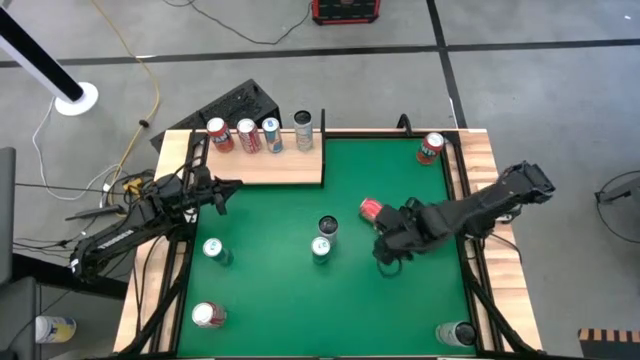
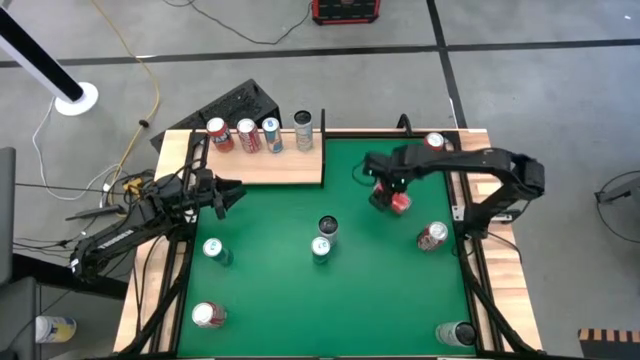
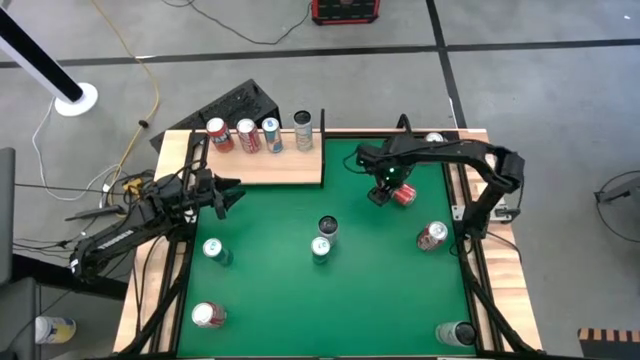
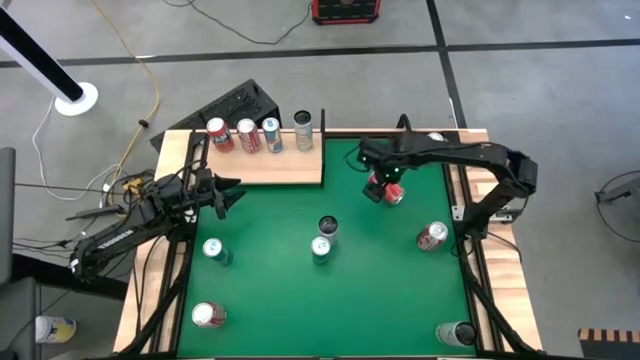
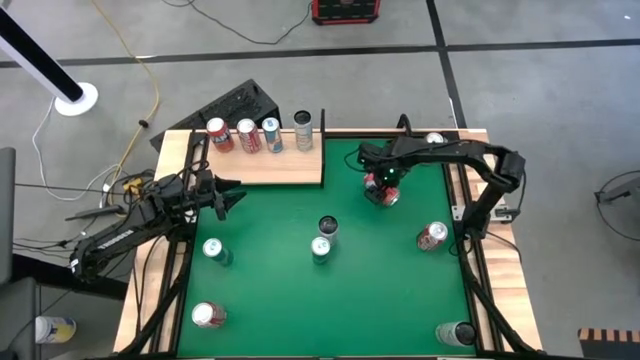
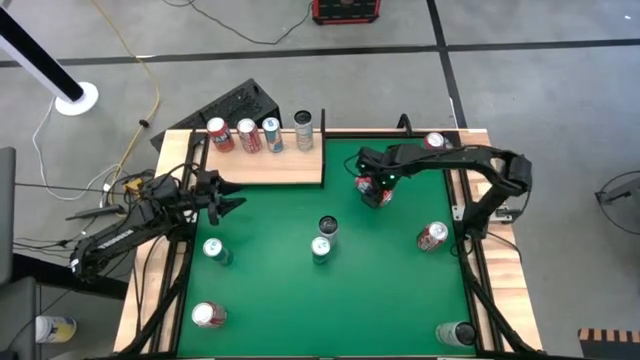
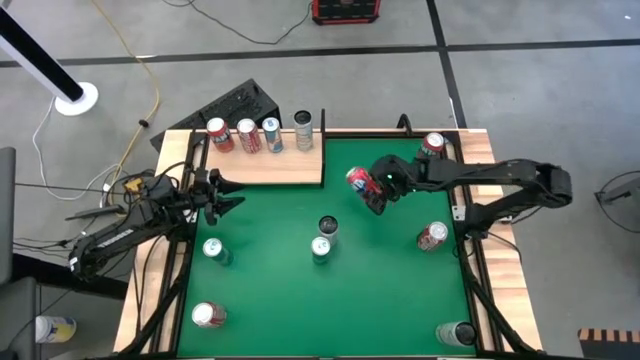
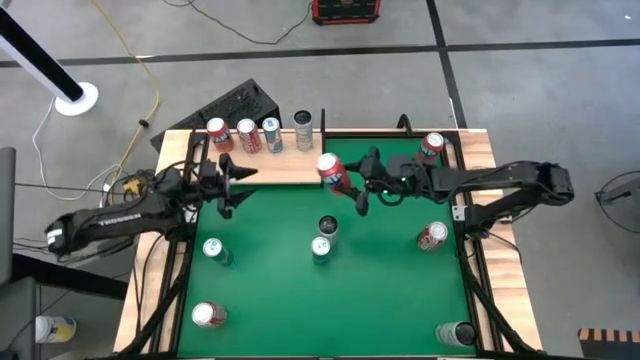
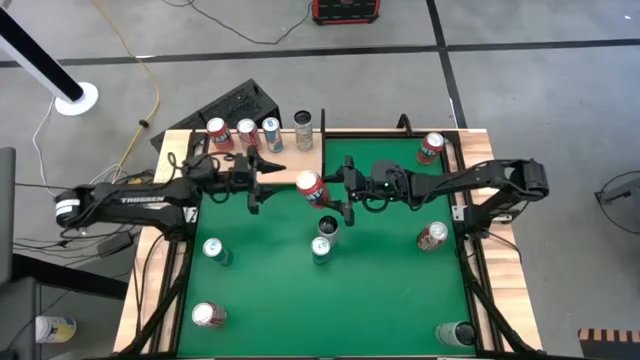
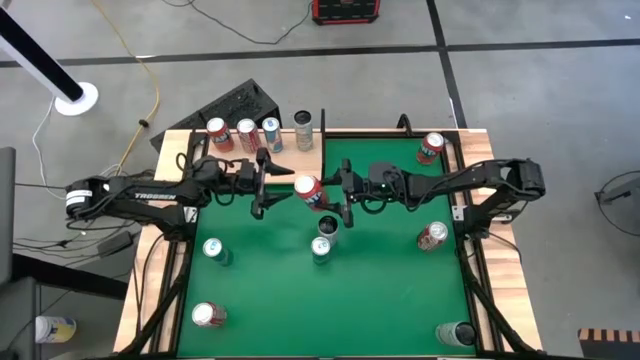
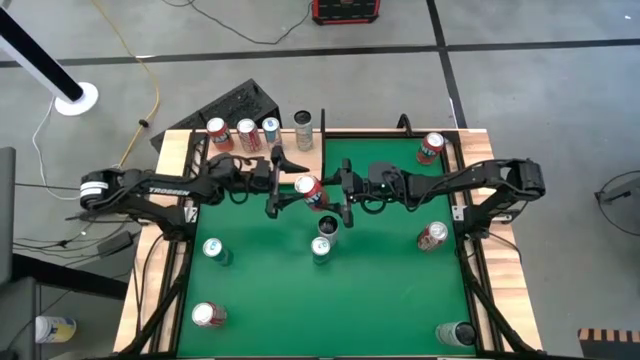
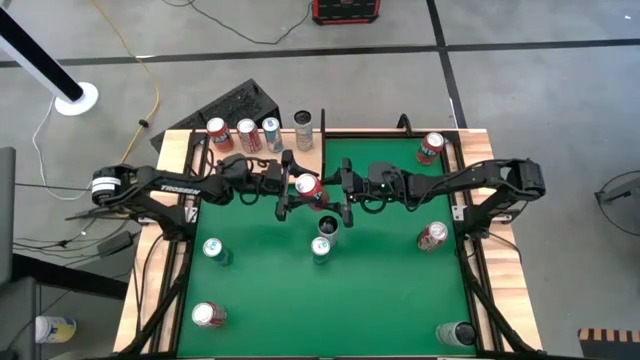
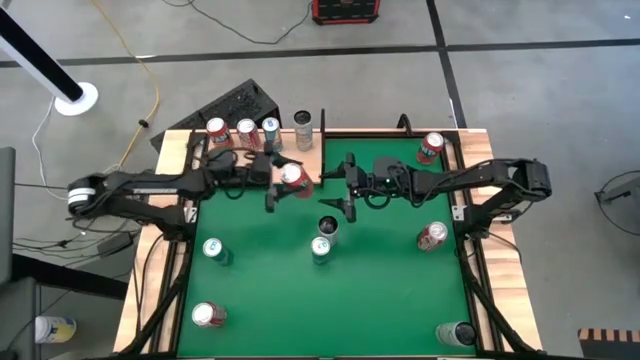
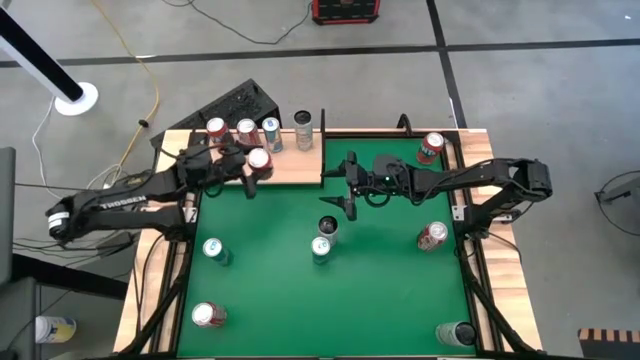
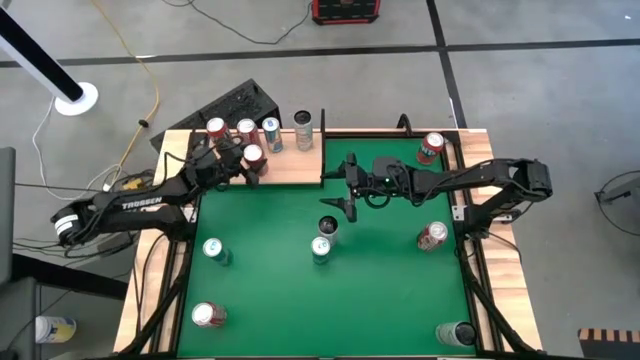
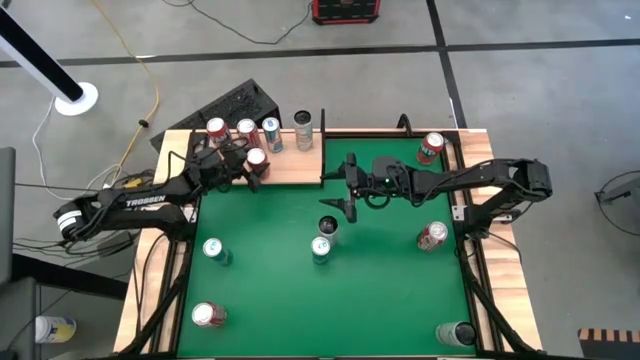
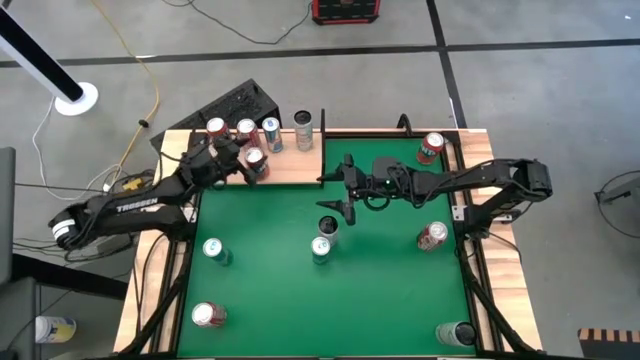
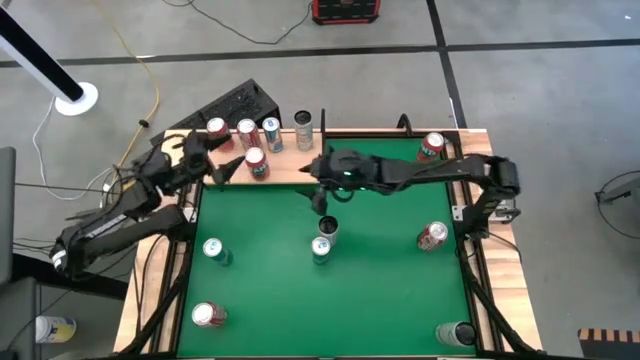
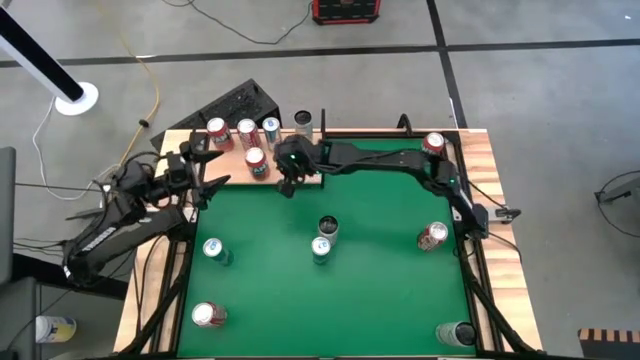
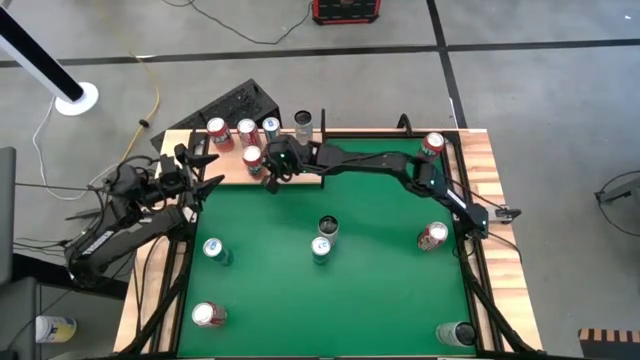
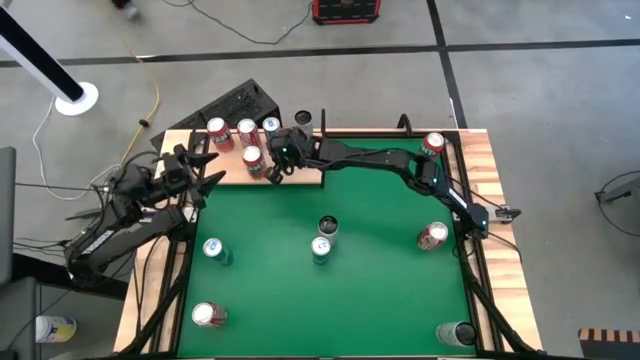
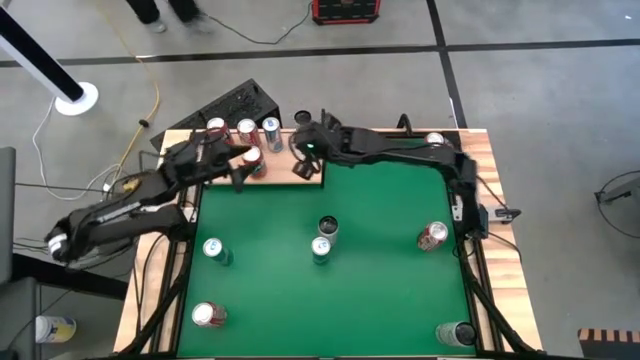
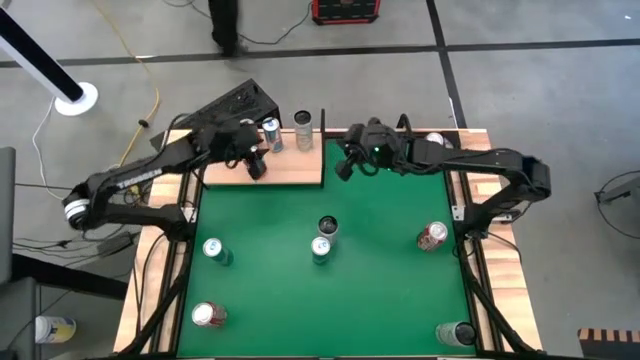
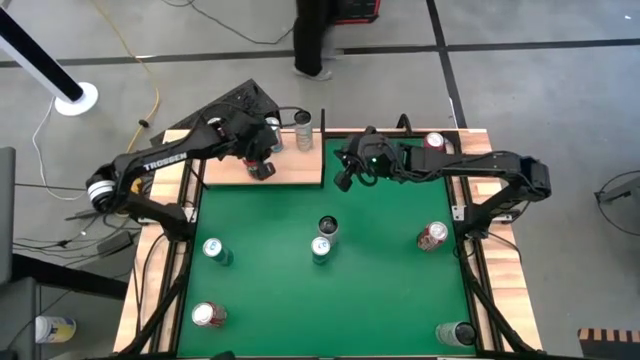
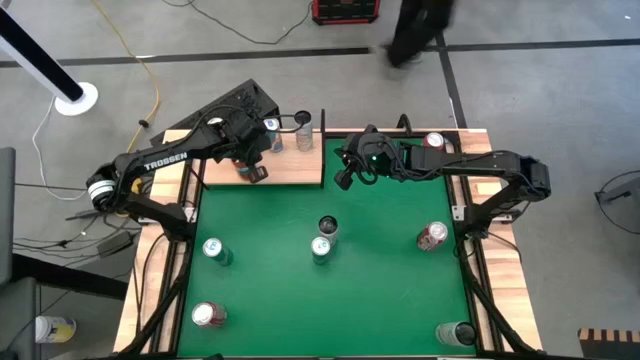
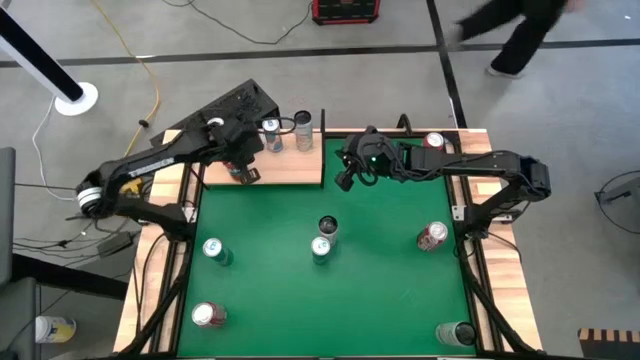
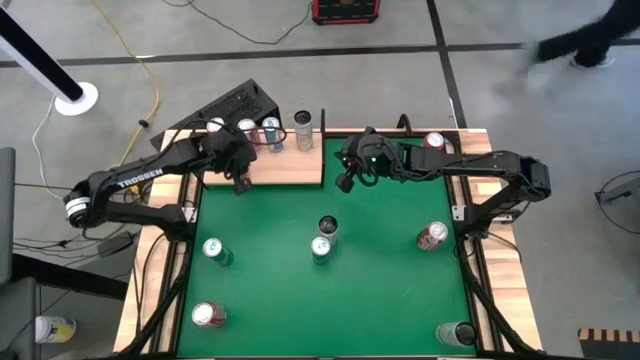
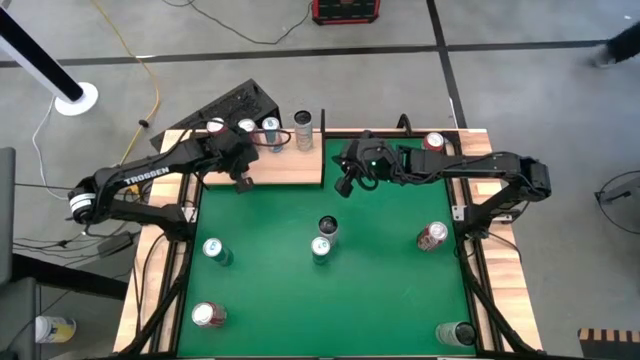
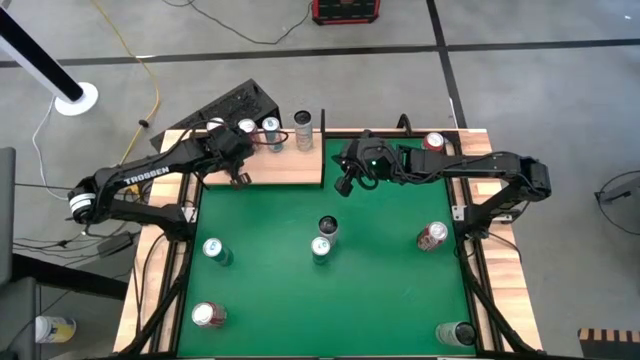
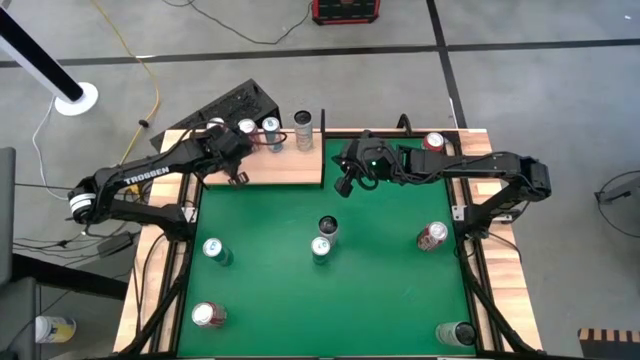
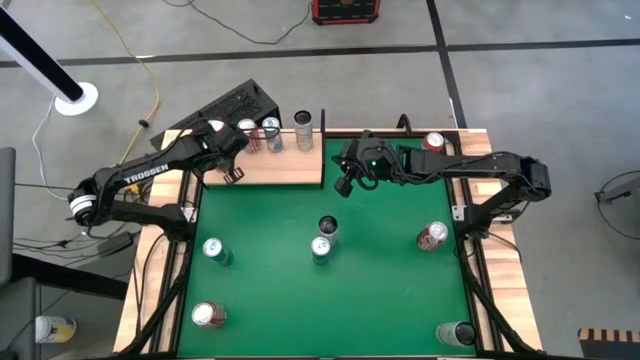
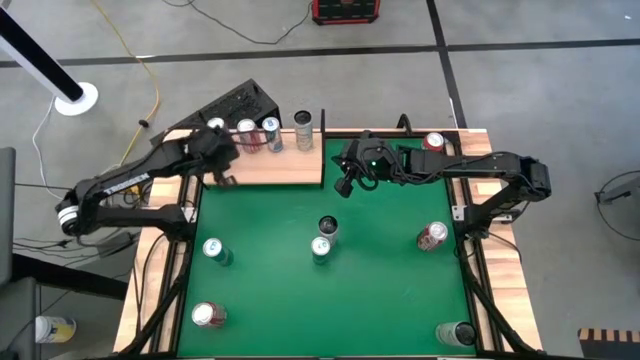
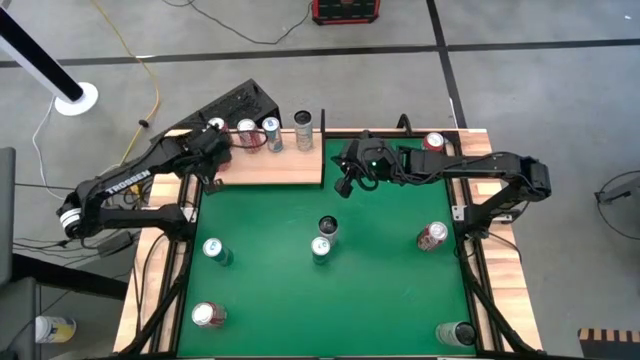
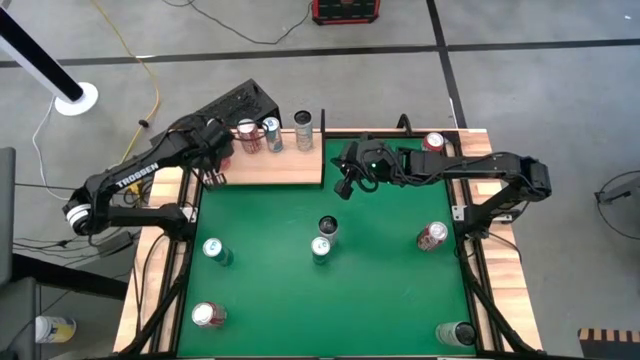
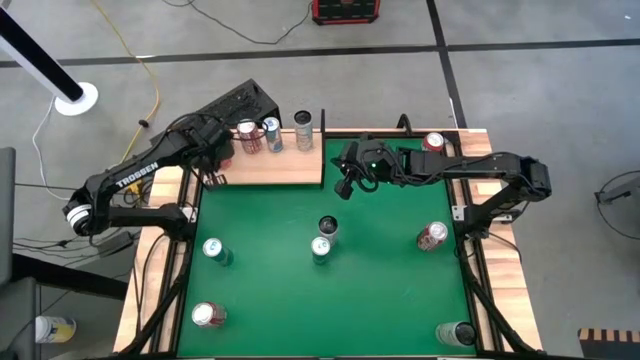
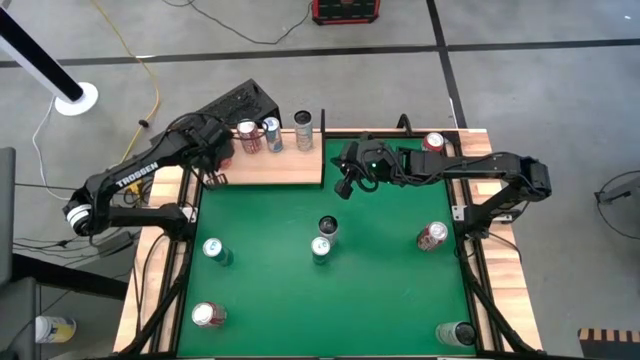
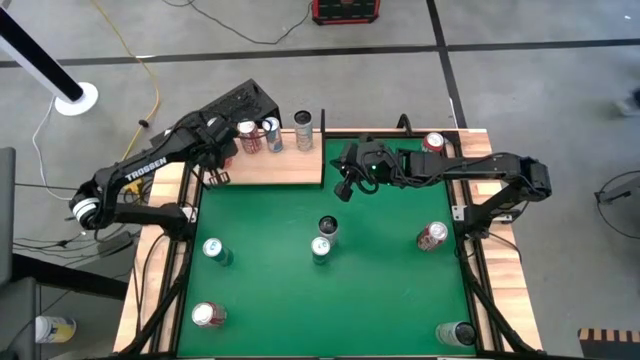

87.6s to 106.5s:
Task: Place canned beverage on shelf
Put the bottom red soda can on the shelf aligned with the other red soda can

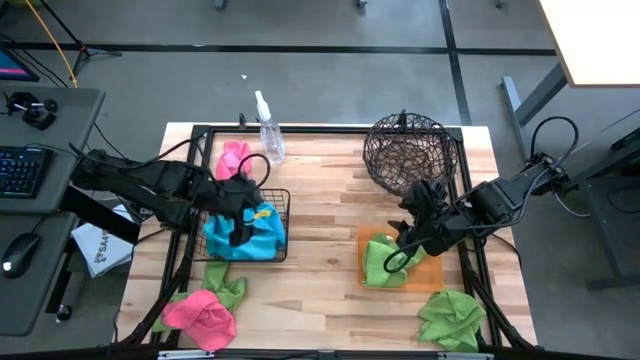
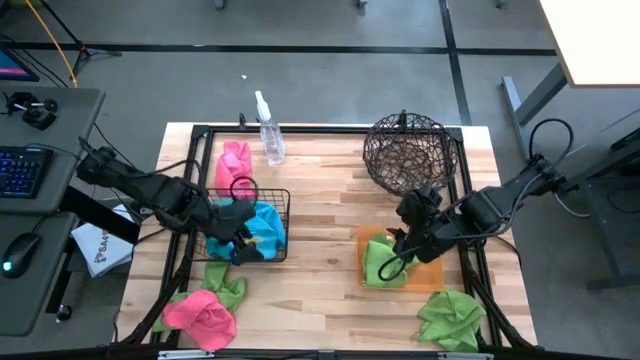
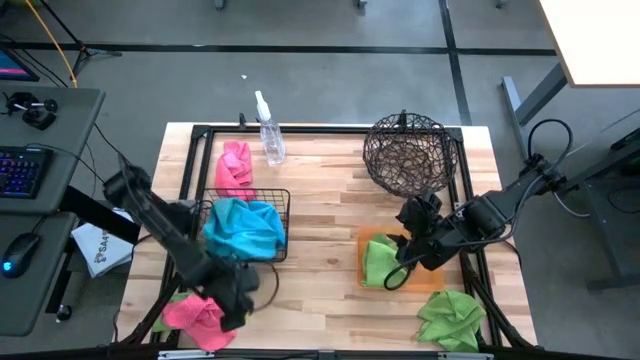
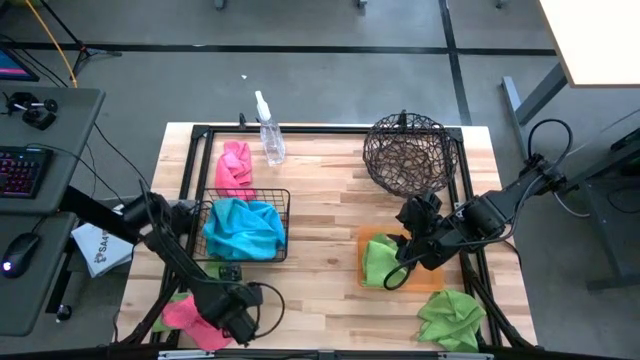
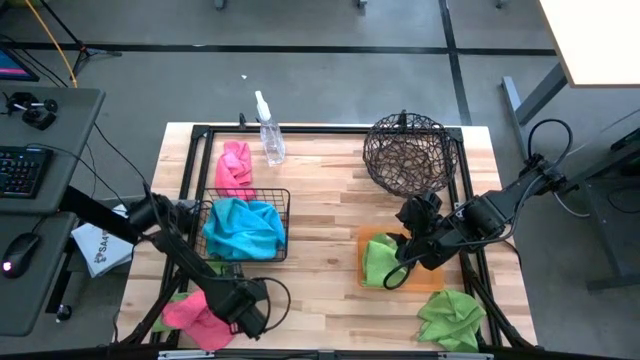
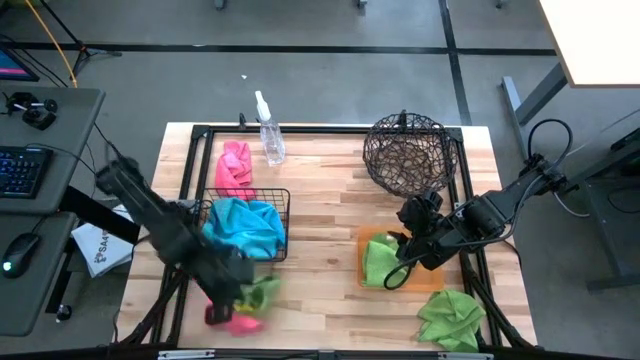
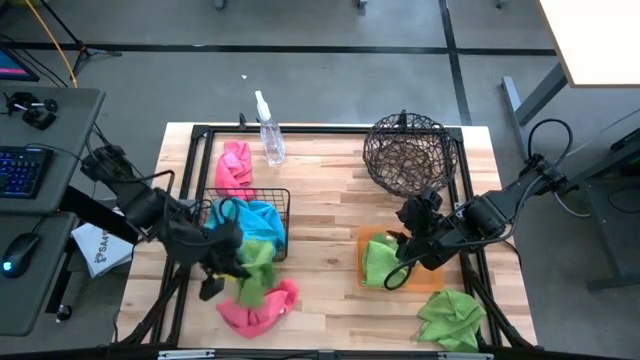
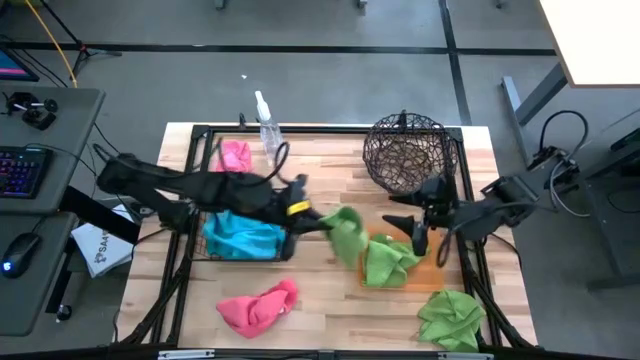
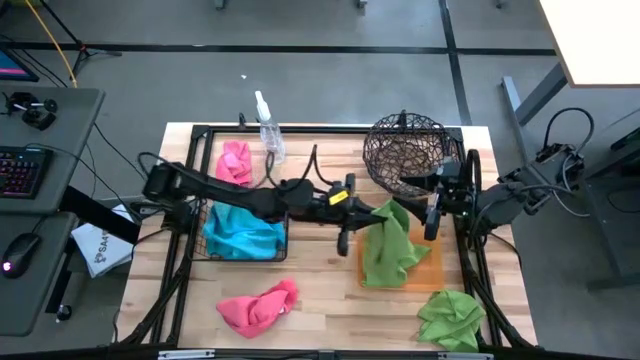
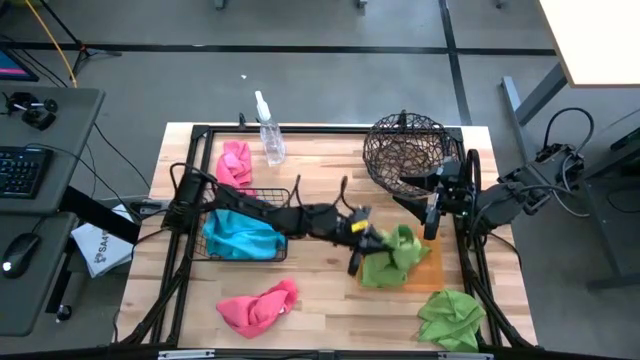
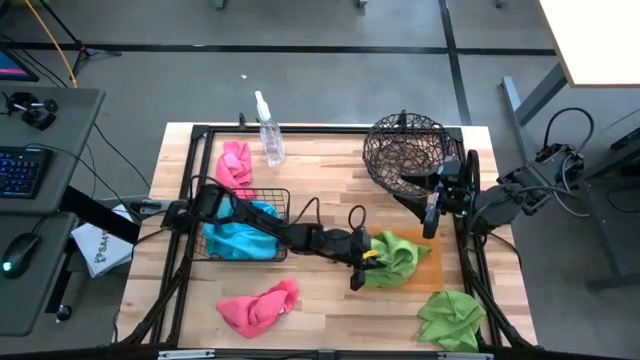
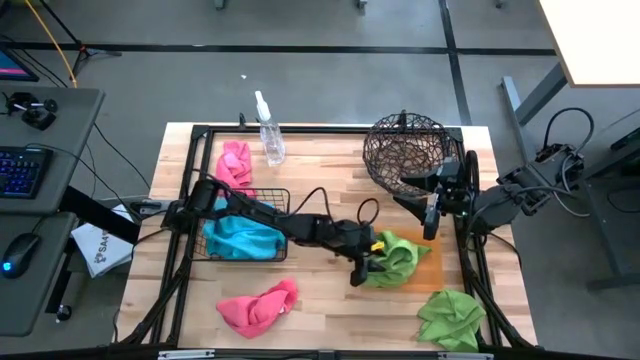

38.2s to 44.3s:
Task: Sort microfiber towel by color & place in baskets
Put the left green microfiber towel into the orange bin
